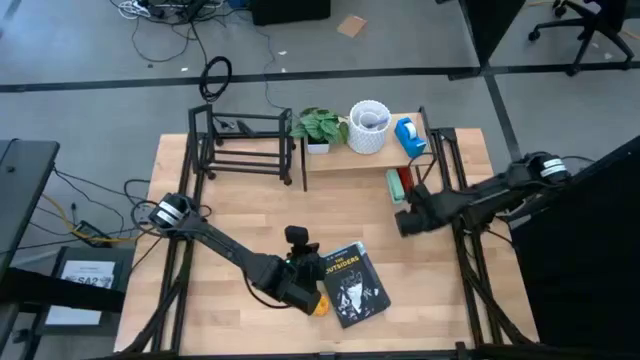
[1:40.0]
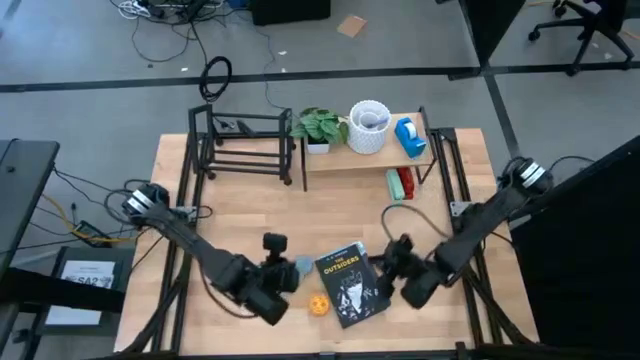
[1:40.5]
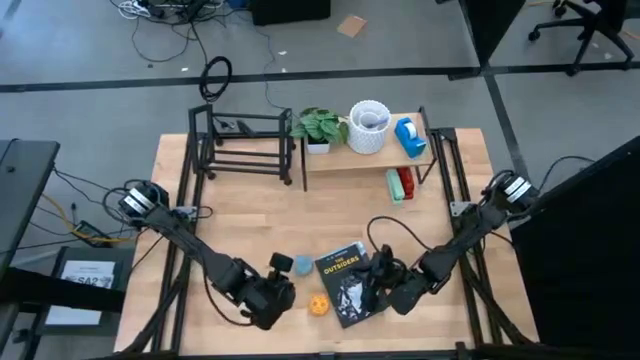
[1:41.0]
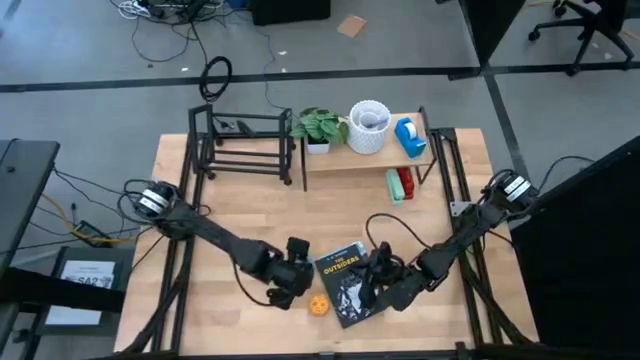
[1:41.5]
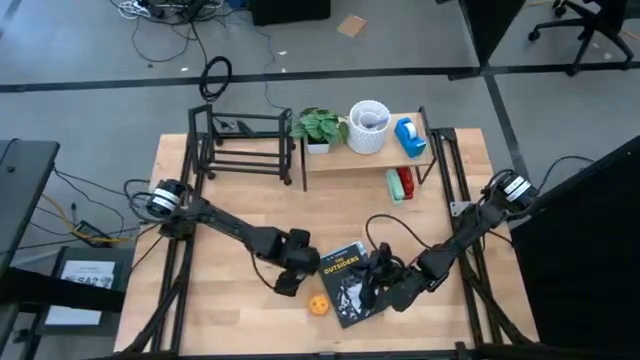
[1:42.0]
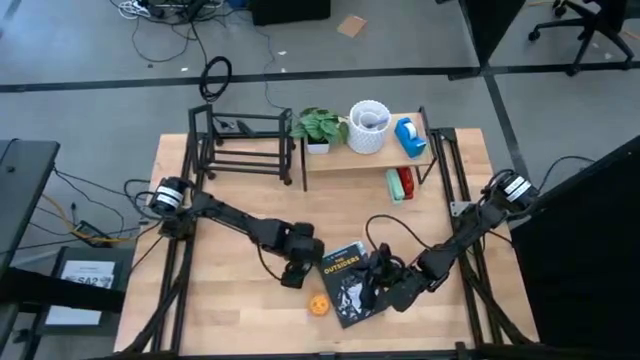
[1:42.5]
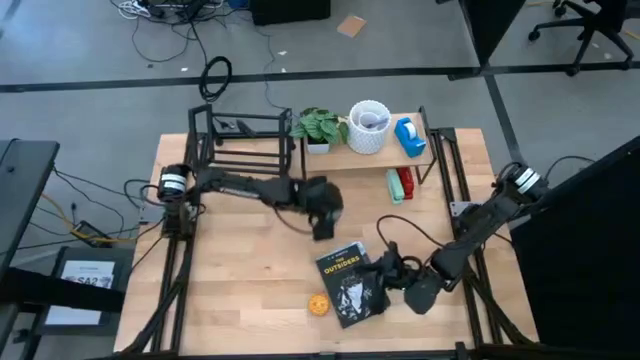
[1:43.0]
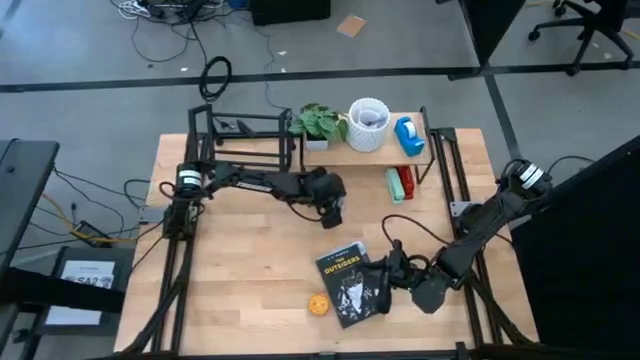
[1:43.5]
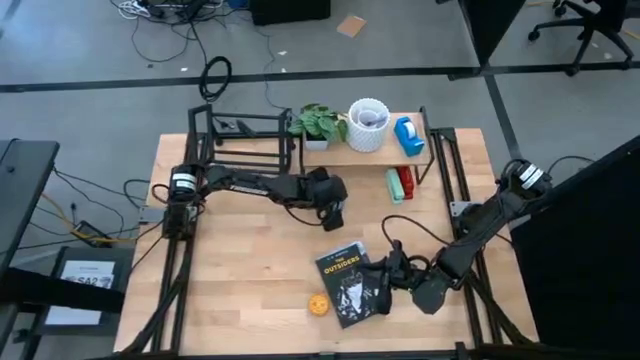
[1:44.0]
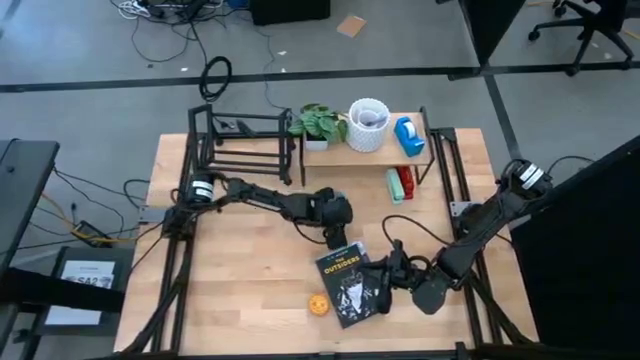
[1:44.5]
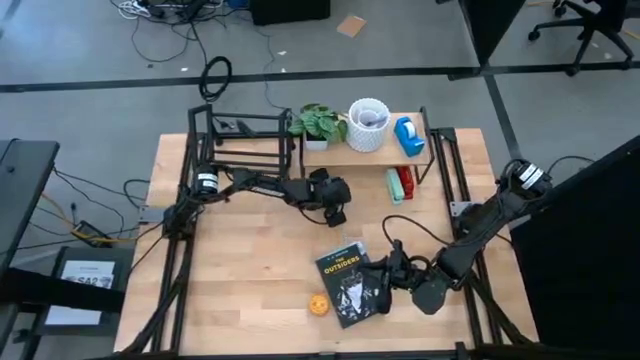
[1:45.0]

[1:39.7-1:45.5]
Task: Stock shelves
Put the blue scented candle under the shelf

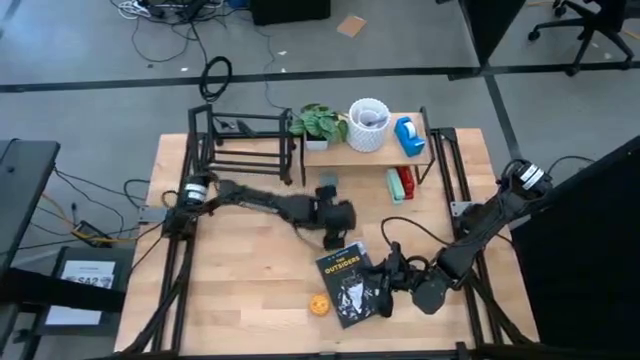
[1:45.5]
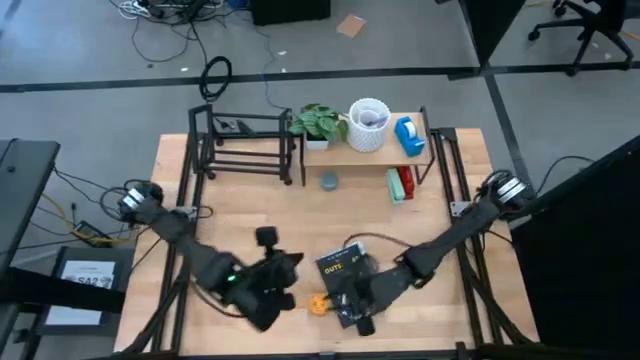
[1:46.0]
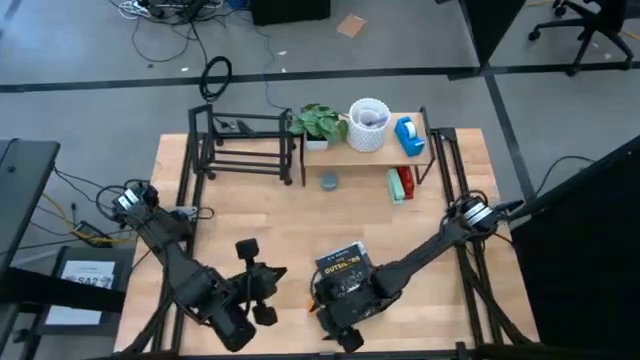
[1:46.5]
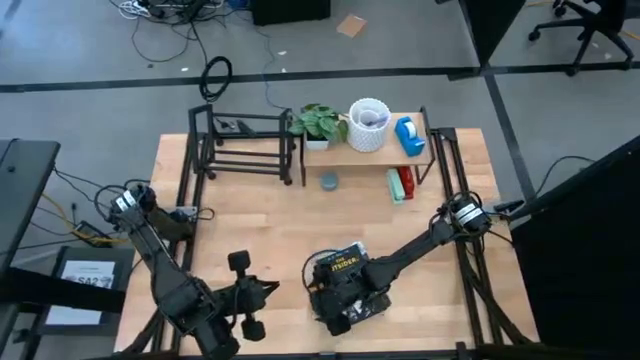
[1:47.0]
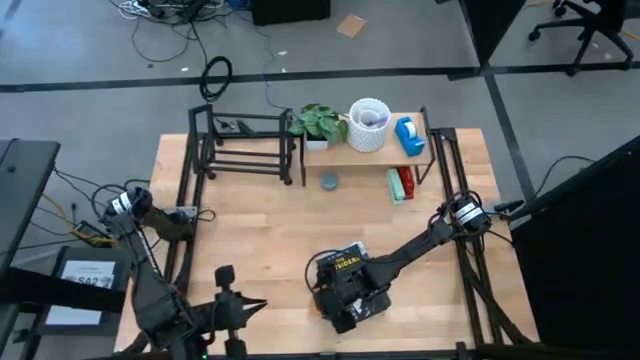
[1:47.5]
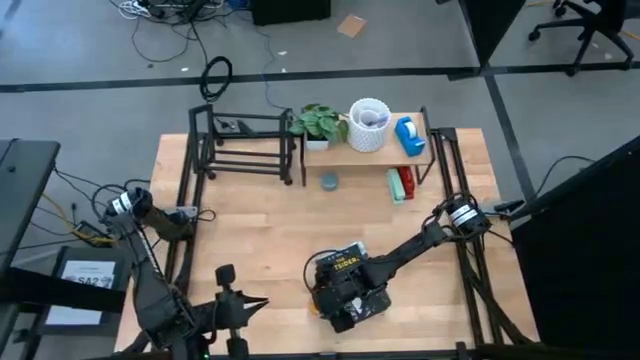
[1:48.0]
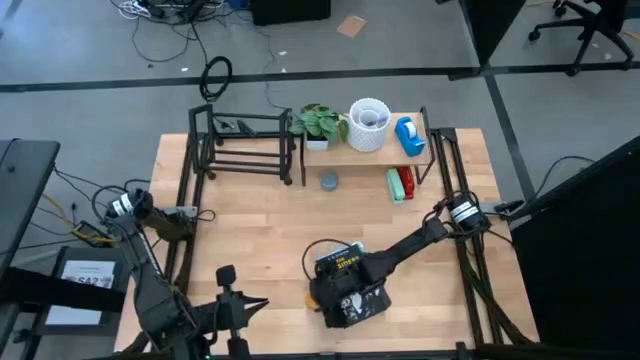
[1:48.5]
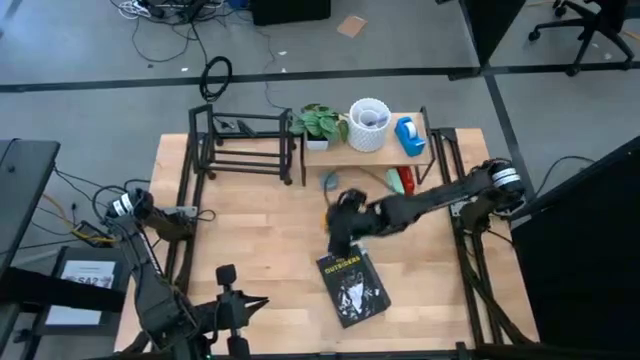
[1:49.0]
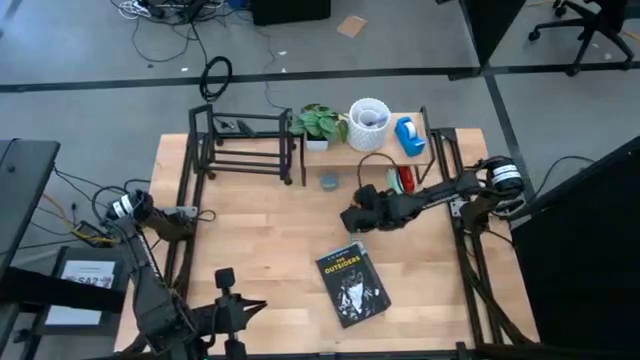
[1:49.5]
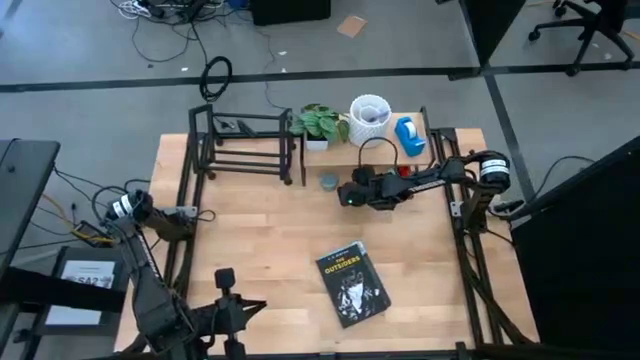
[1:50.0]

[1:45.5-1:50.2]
Put the yellow scented candle under the shelf

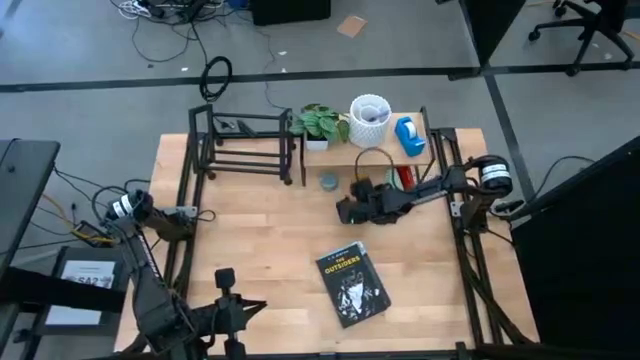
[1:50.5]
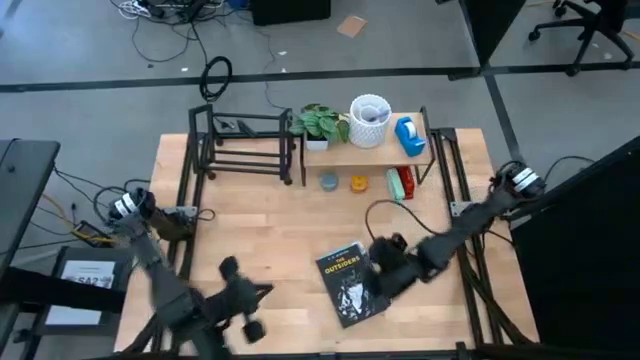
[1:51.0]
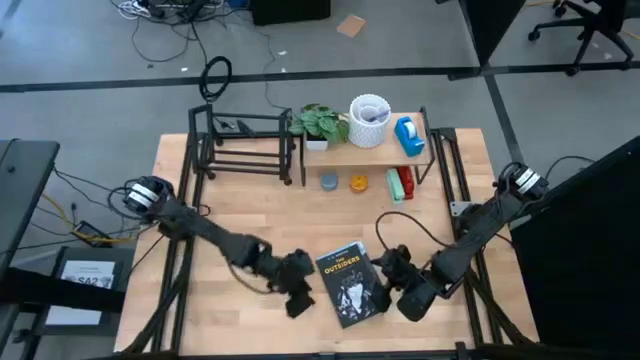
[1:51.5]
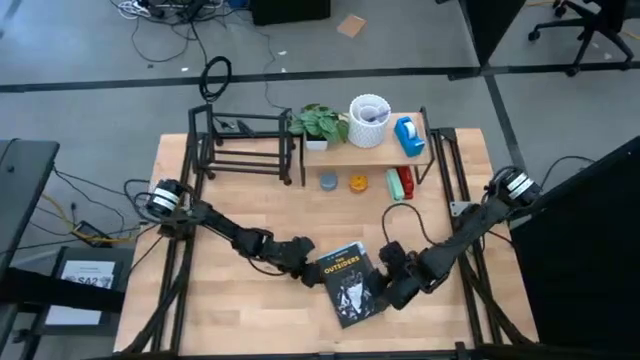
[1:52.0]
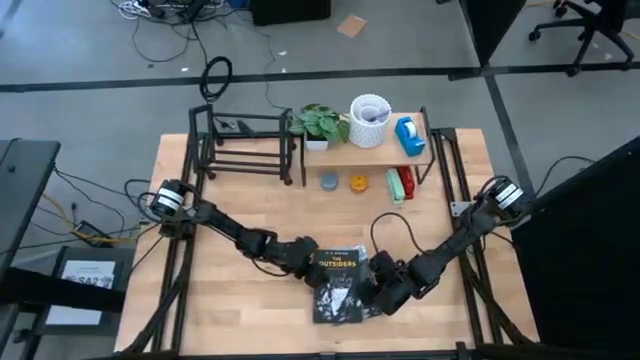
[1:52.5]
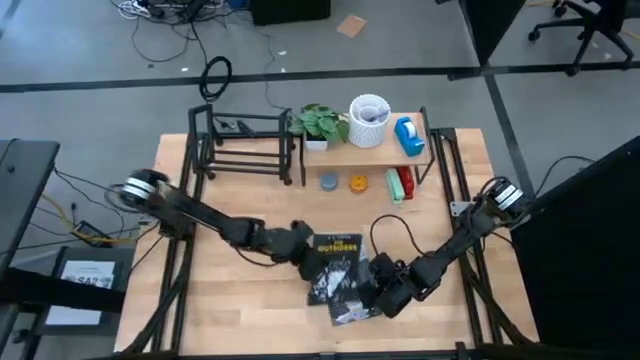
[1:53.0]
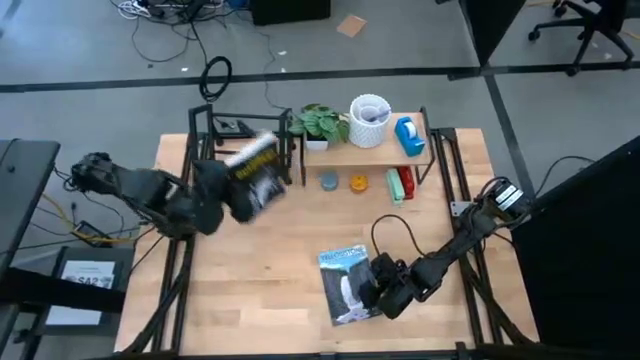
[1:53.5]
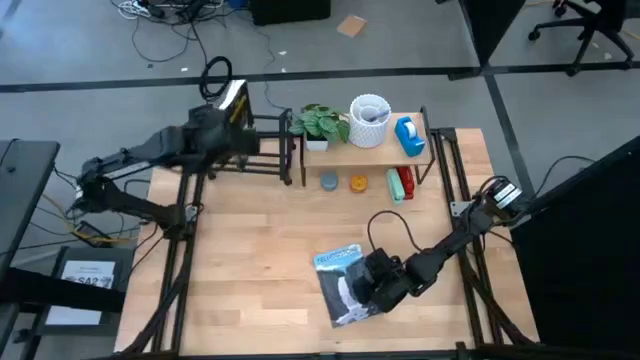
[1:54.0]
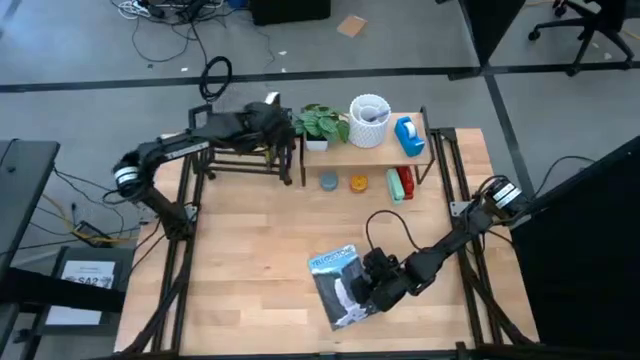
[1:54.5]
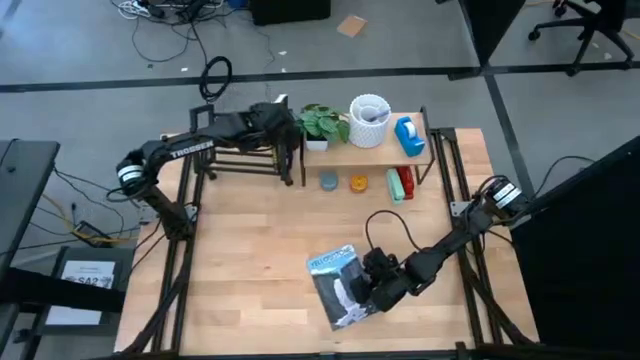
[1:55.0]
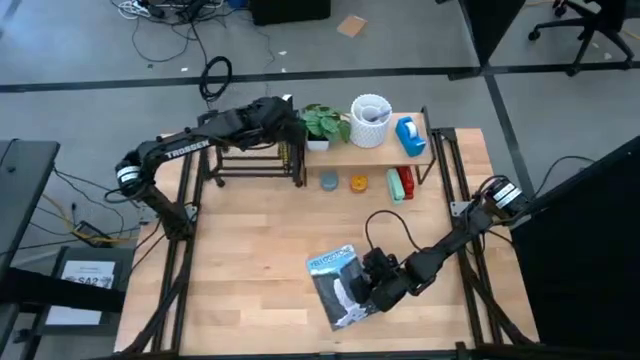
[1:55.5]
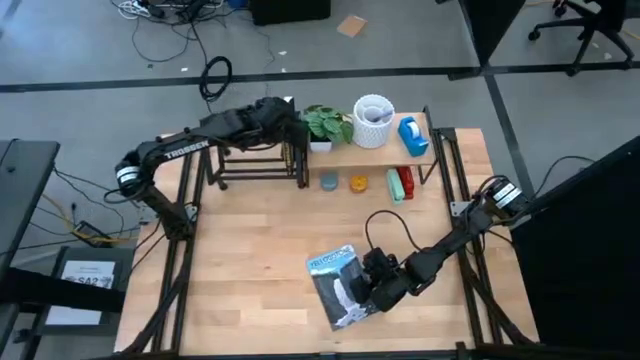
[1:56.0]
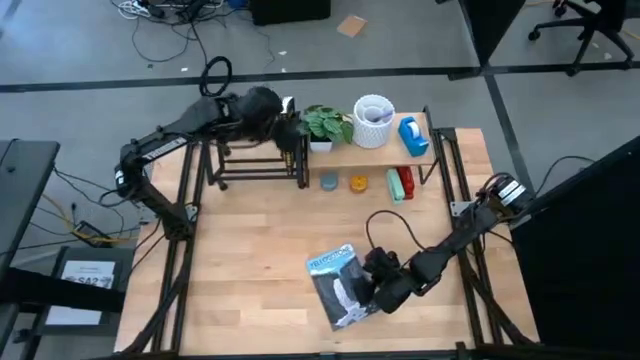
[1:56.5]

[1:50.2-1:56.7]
Put the black book on the black book shelf

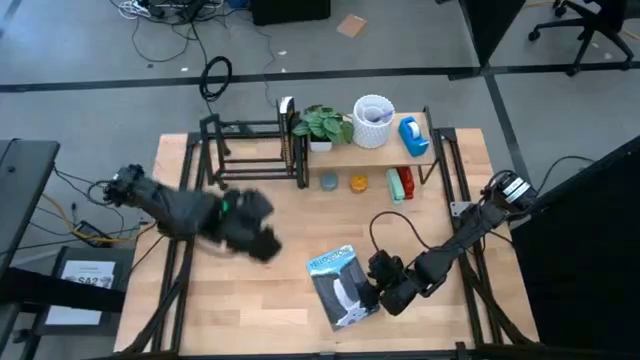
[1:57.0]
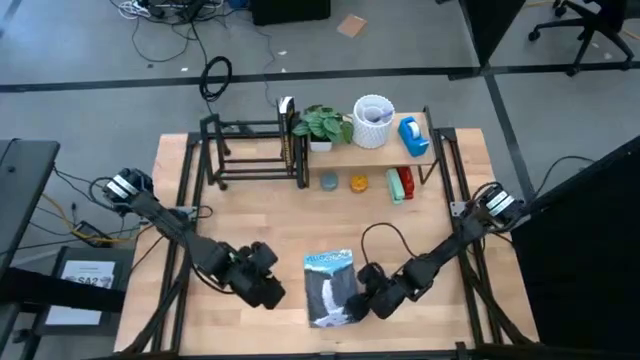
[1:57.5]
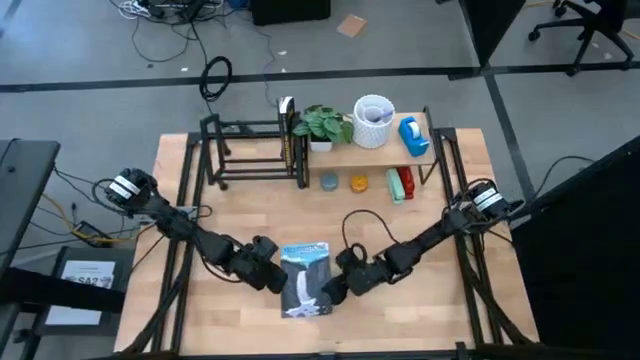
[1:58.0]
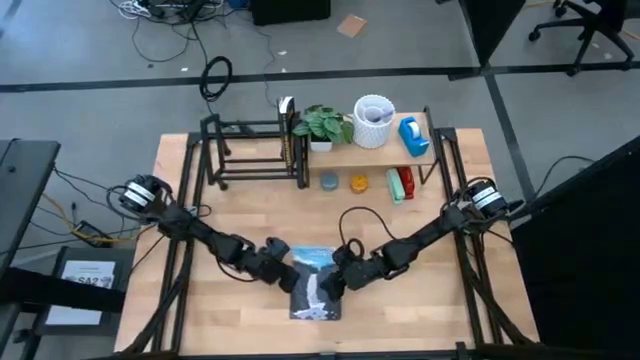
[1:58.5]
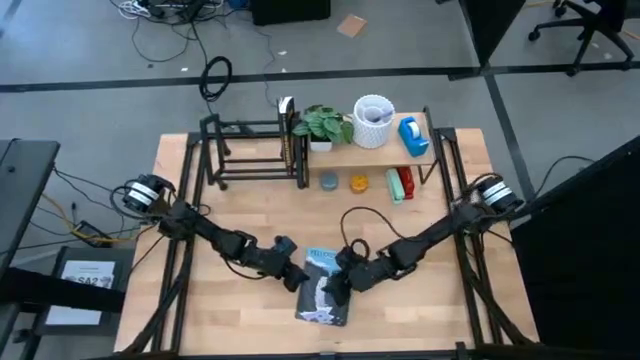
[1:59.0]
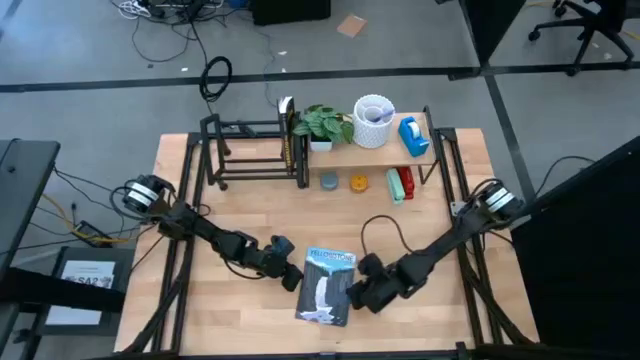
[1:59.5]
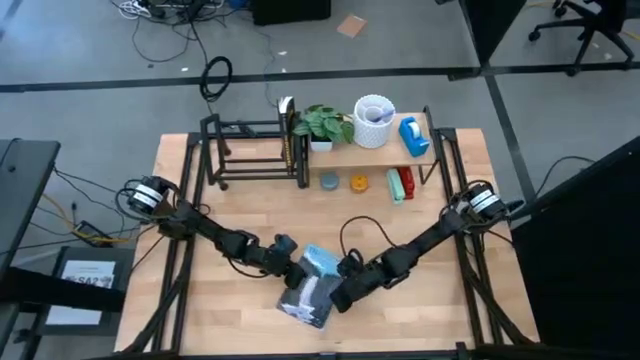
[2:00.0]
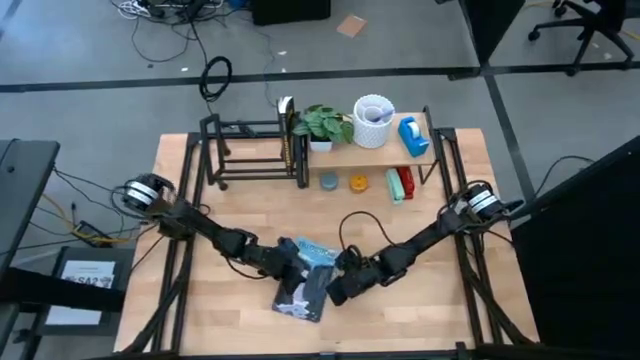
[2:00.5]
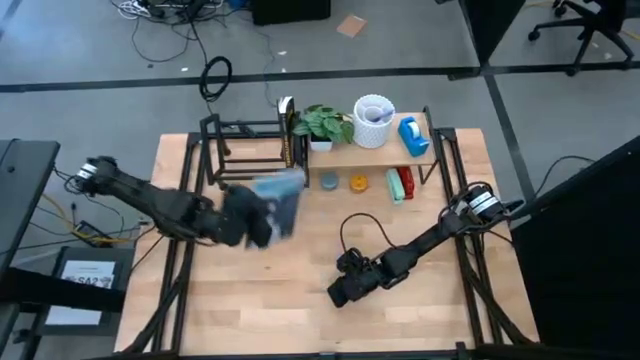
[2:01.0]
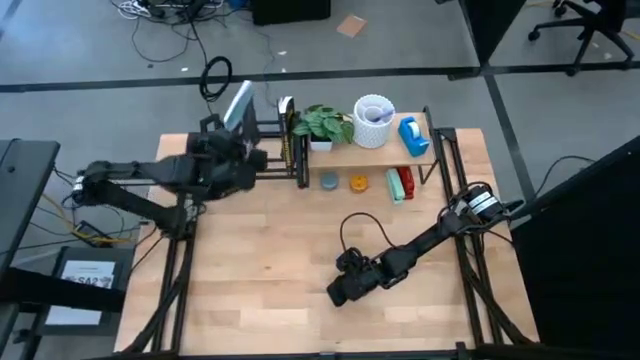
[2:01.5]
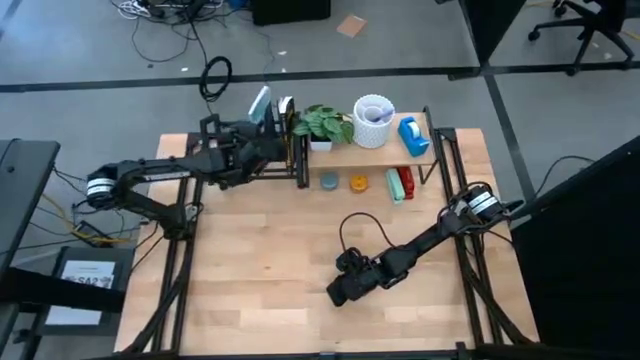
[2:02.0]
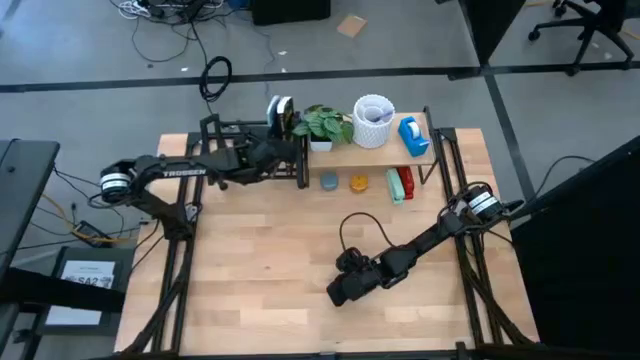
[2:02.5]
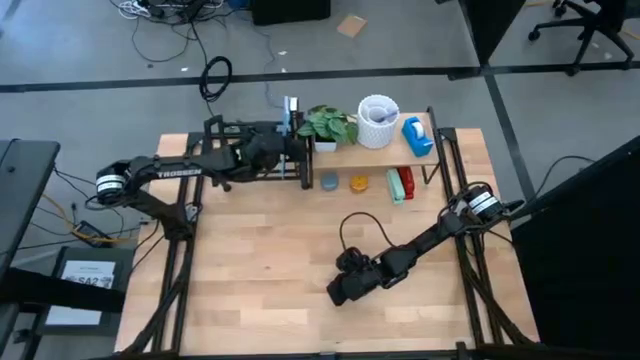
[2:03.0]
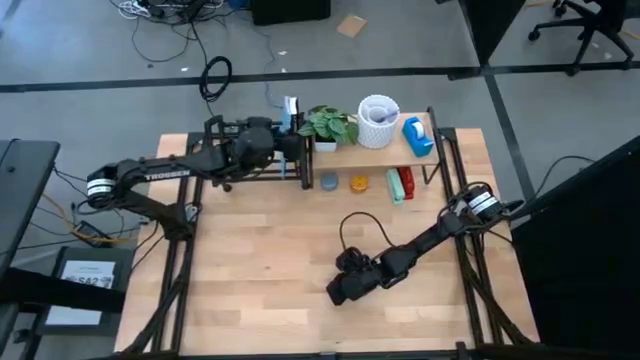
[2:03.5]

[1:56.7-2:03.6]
Put the blue book on the black book shelf
